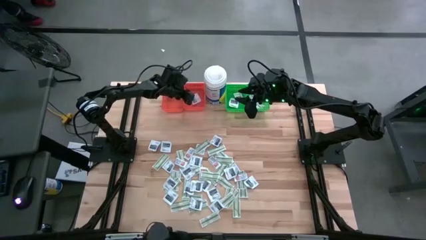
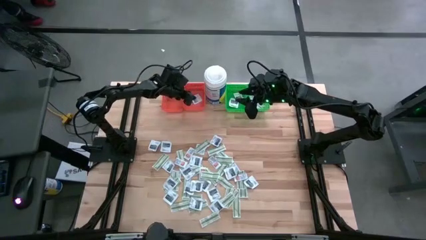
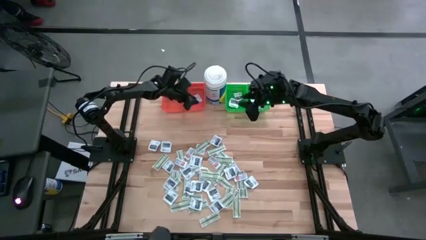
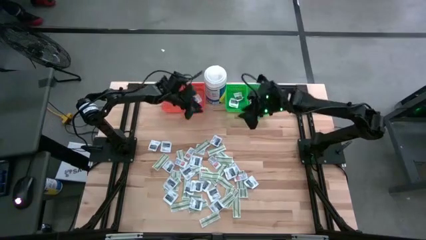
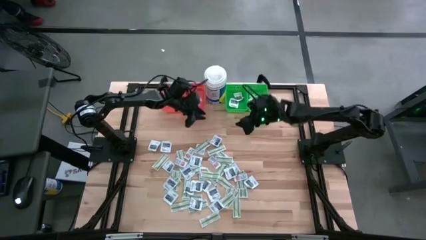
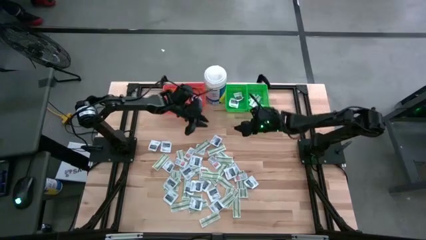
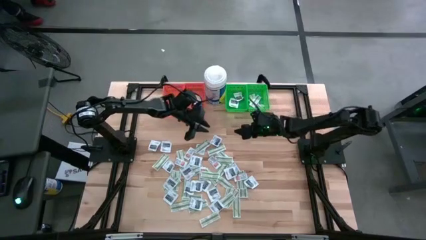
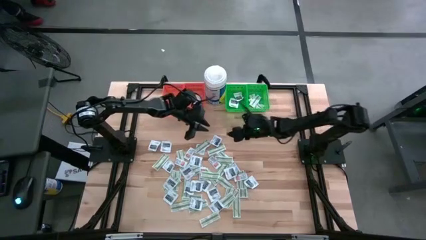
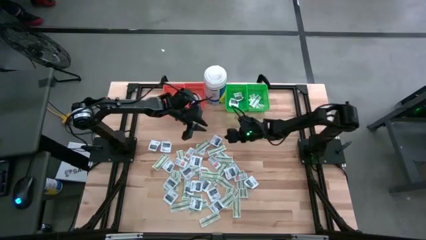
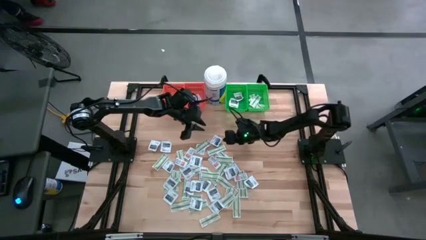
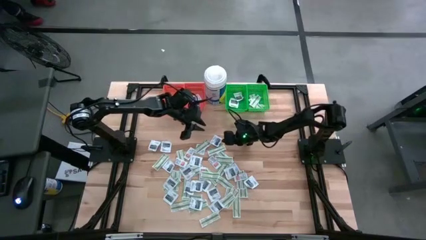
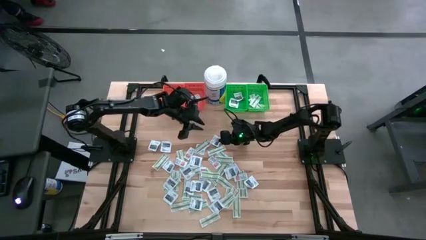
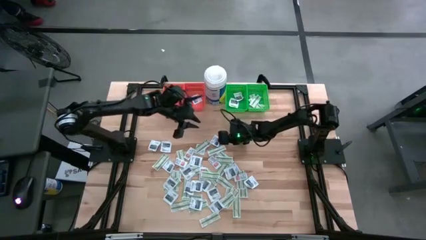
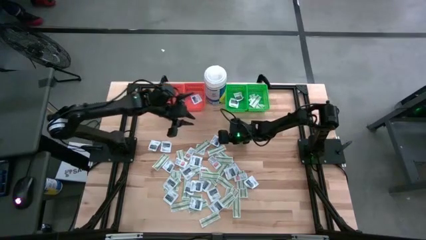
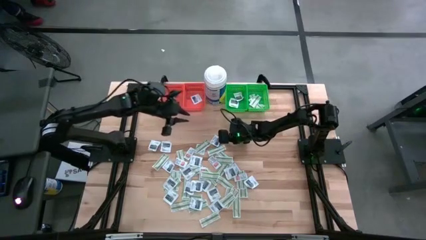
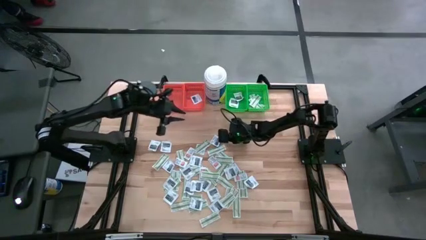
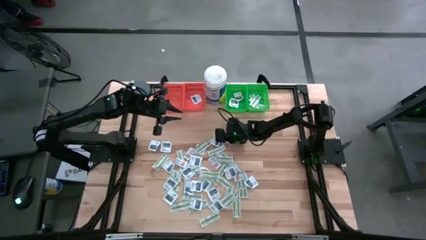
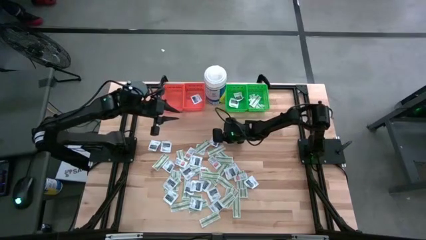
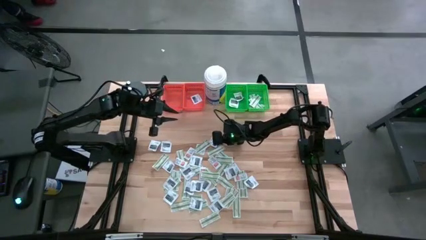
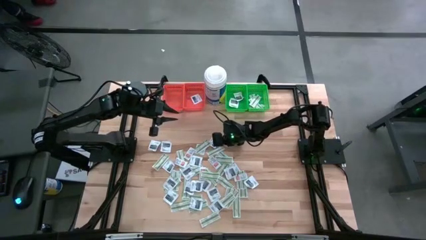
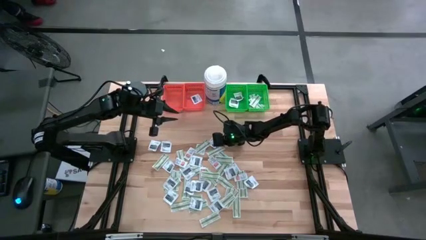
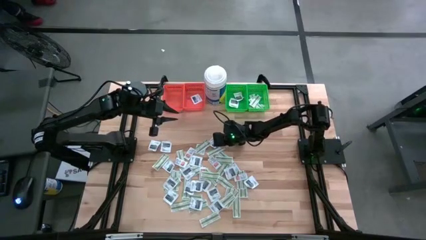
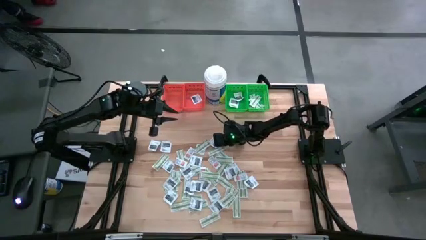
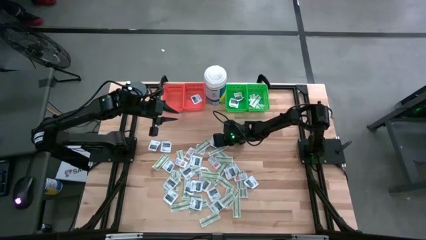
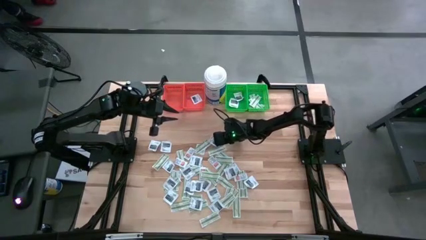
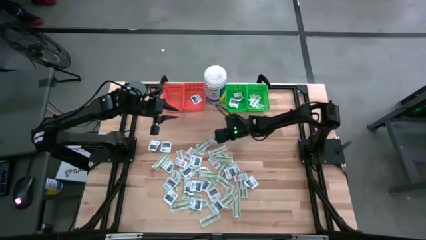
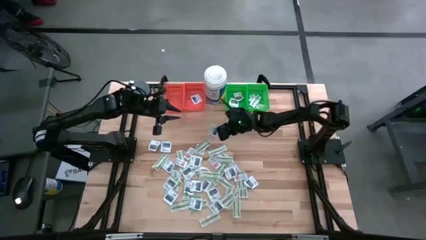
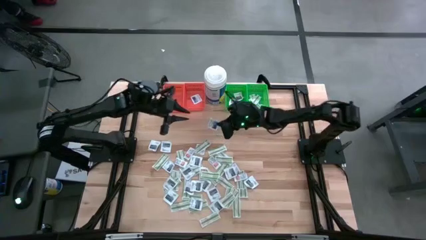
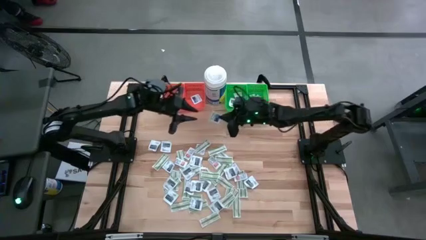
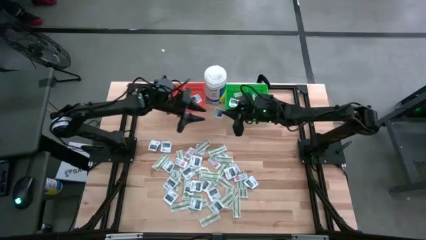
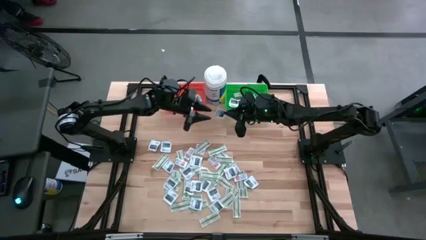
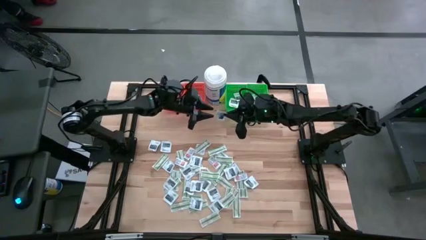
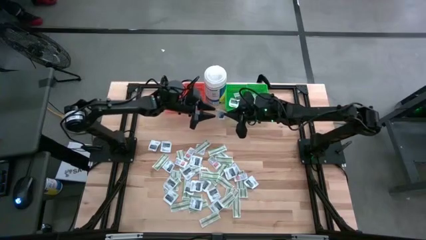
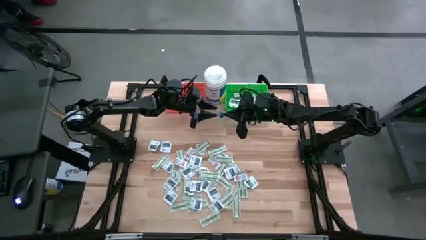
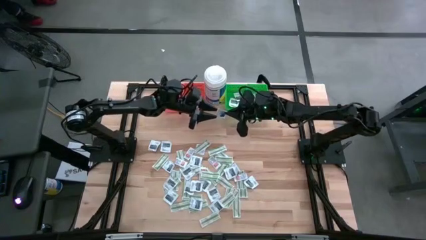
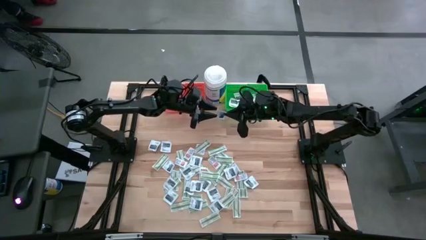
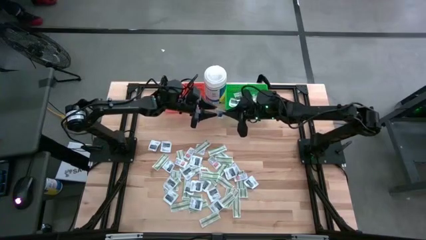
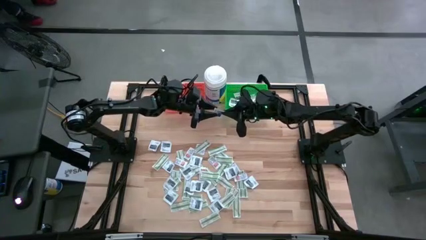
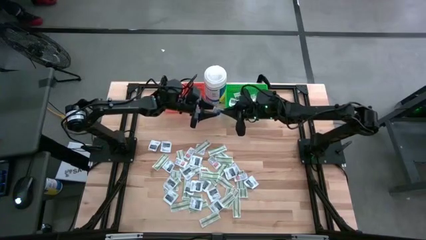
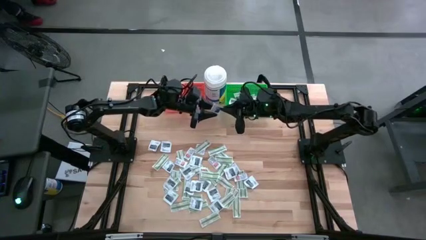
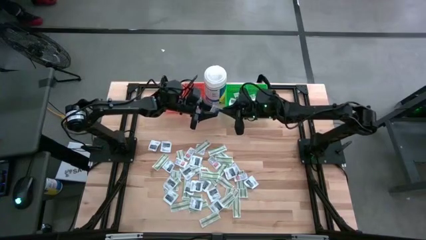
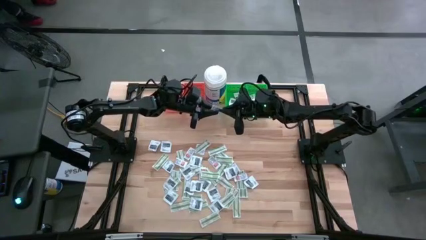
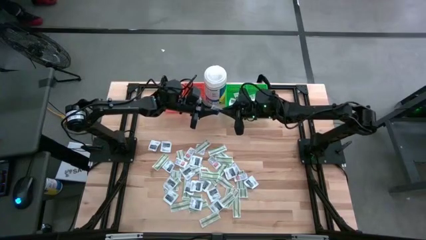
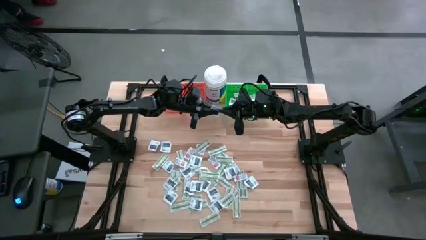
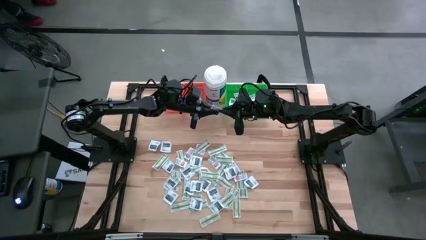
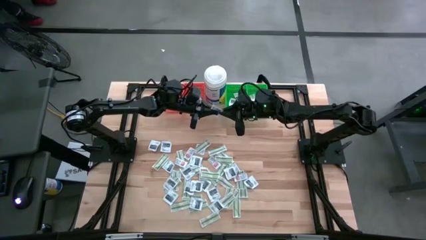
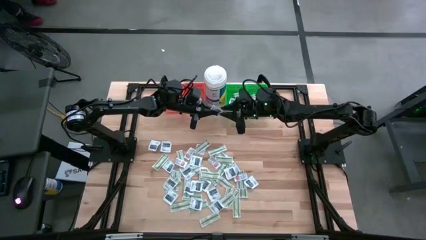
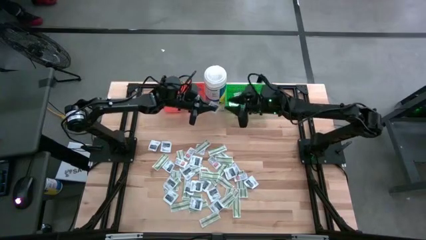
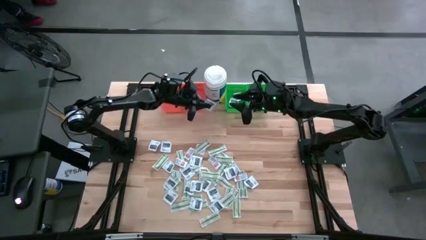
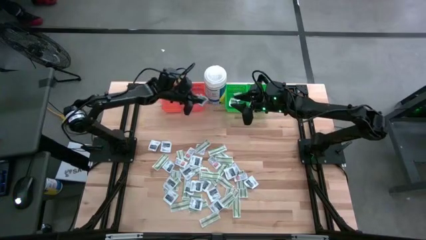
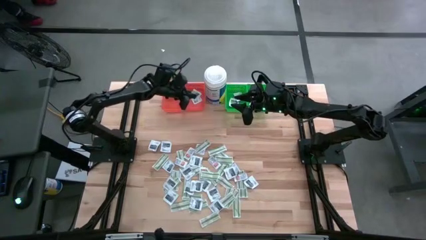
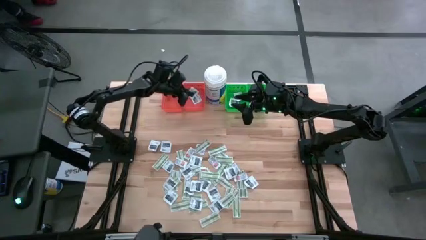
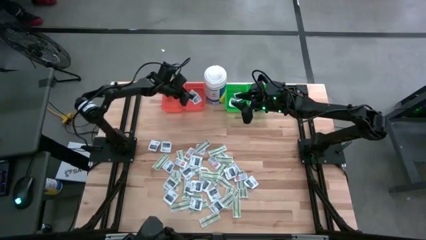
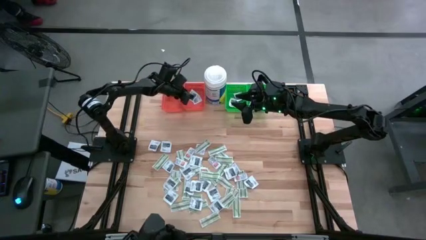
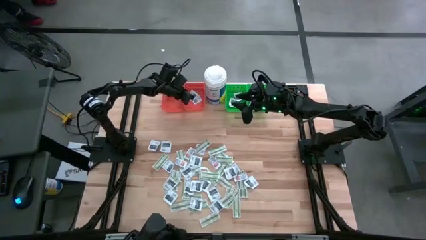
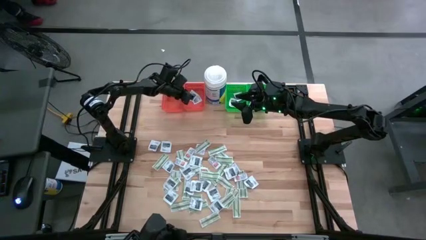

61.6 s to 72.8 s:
Task: Pick & Place First Aid Supplies
Put the blue alcohol pad into the right orange bin

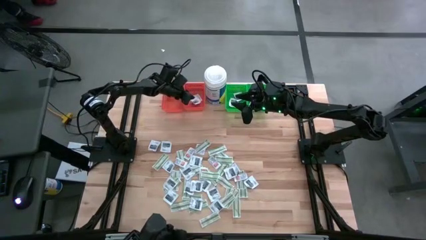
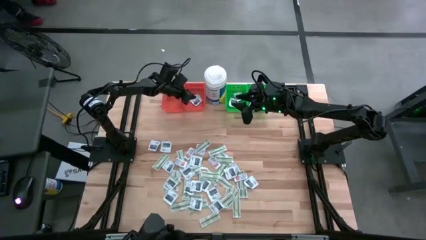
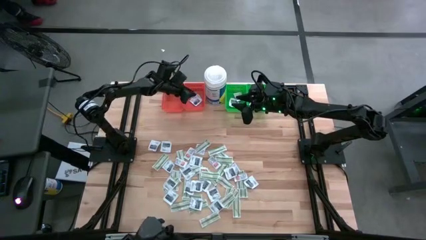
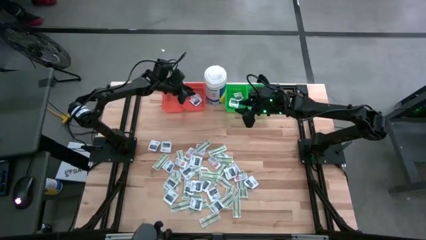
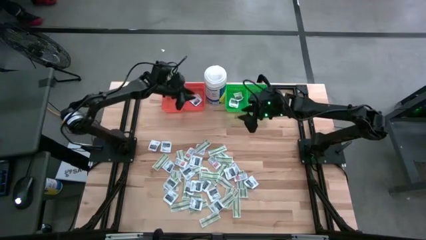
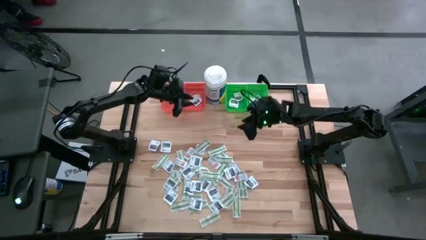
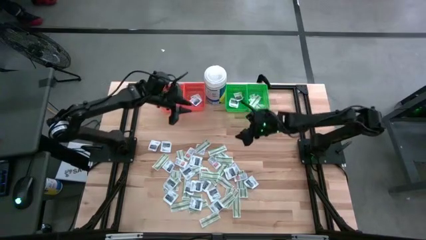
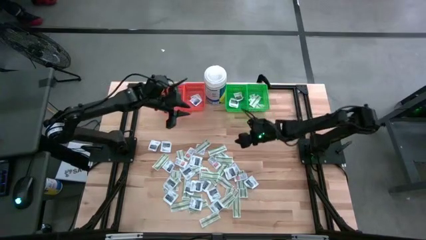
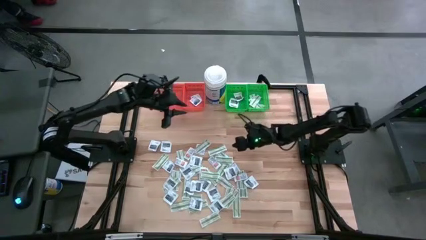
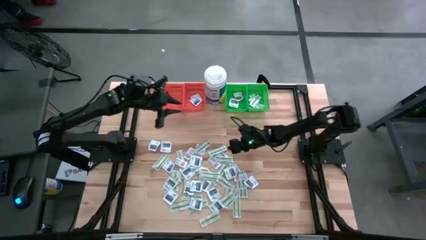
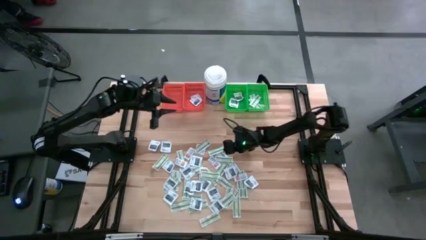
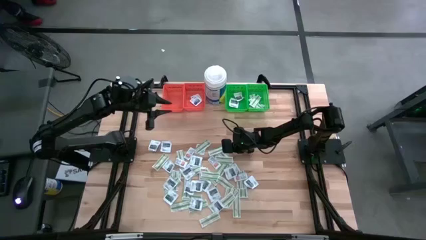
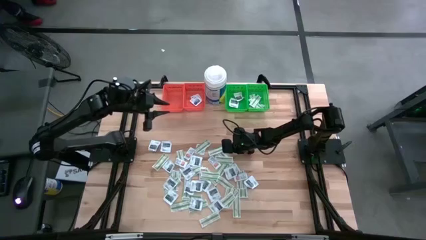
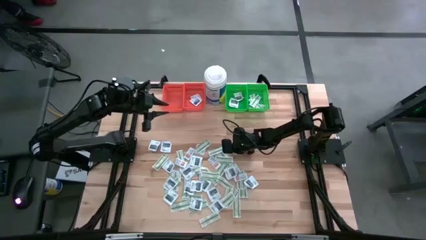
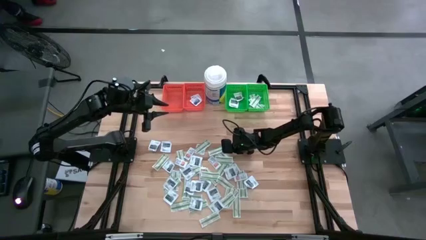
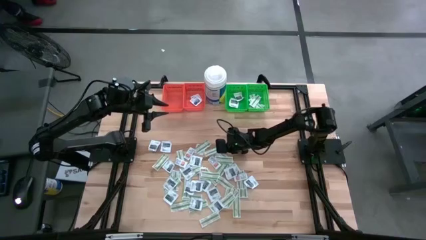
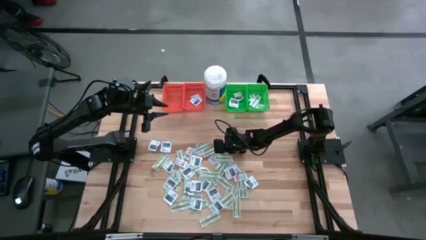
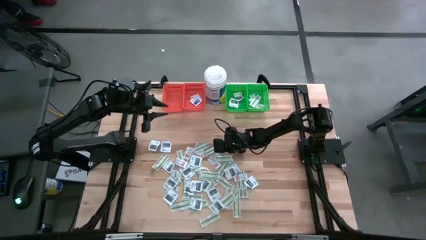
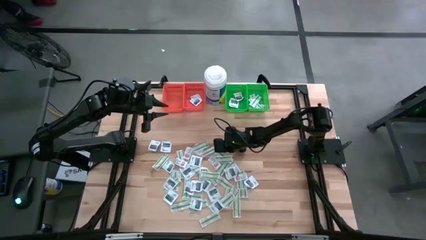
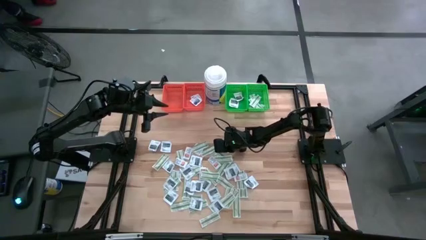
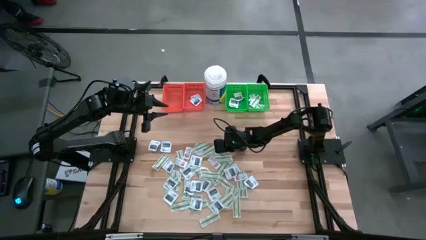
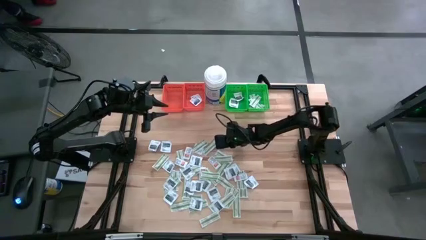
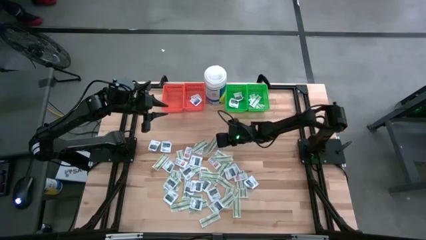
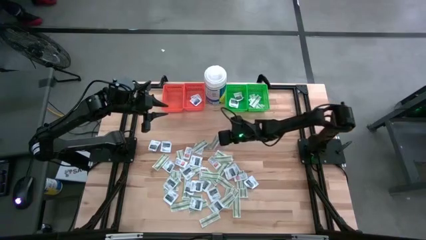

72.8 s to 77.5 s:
Put the green bandage pack into the right green bin
